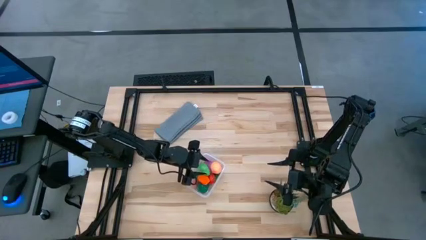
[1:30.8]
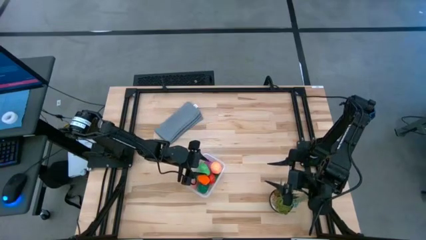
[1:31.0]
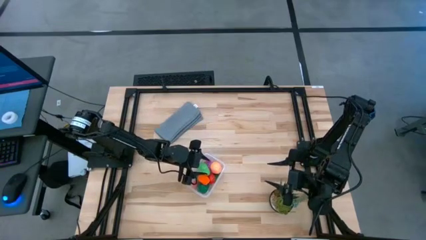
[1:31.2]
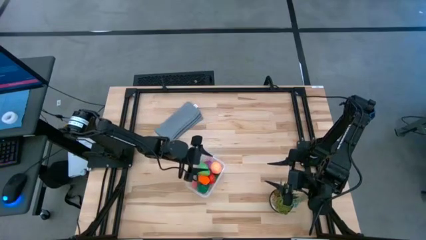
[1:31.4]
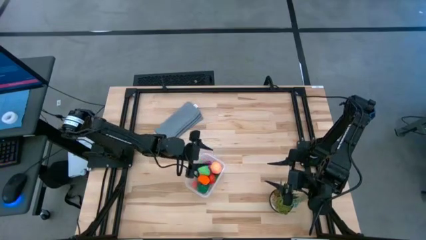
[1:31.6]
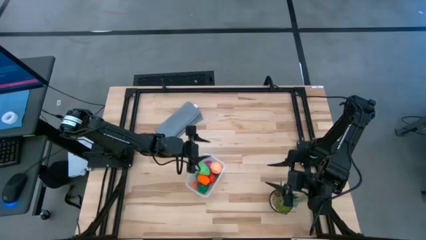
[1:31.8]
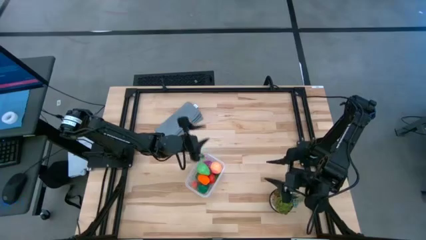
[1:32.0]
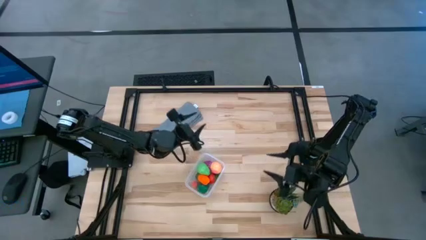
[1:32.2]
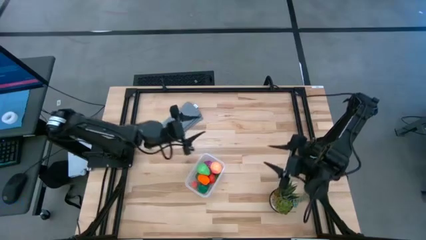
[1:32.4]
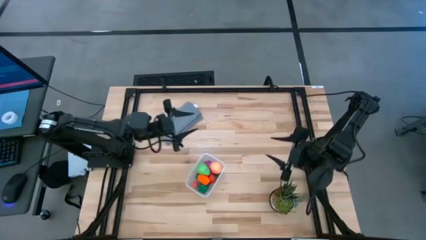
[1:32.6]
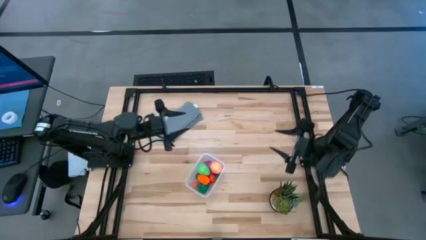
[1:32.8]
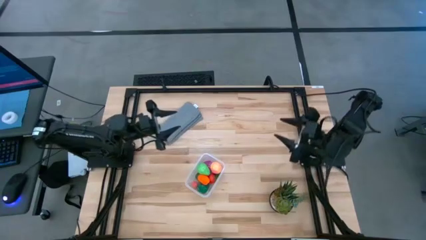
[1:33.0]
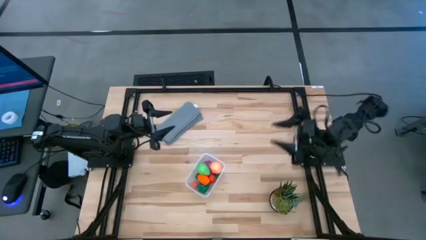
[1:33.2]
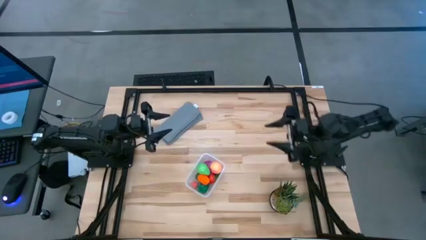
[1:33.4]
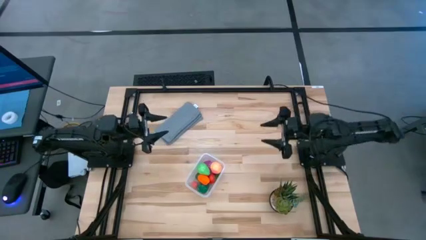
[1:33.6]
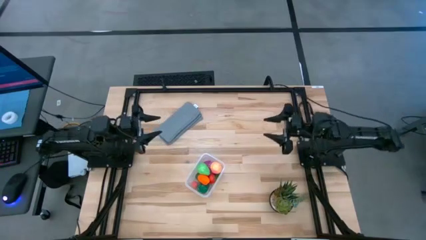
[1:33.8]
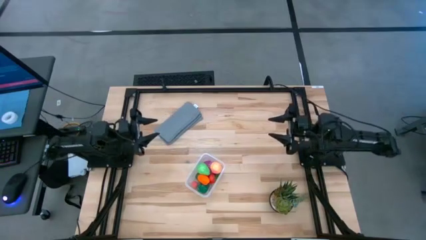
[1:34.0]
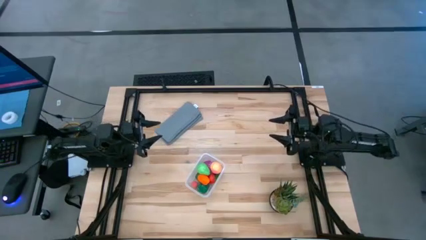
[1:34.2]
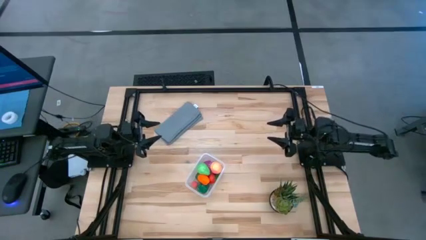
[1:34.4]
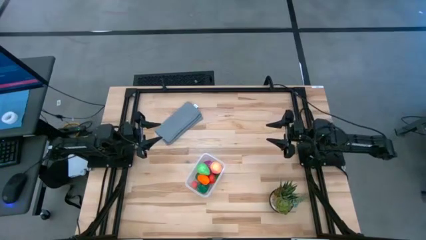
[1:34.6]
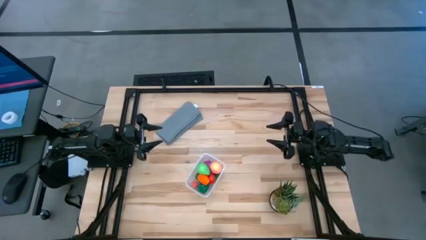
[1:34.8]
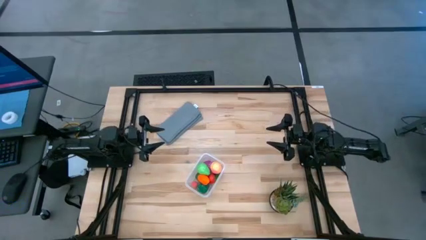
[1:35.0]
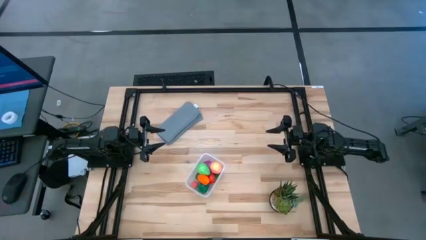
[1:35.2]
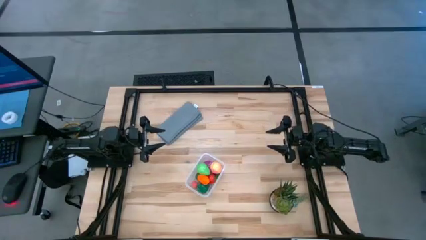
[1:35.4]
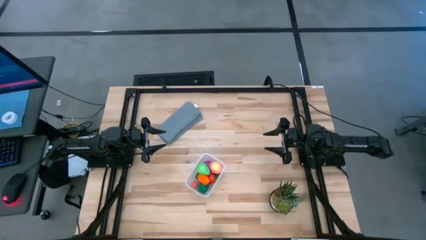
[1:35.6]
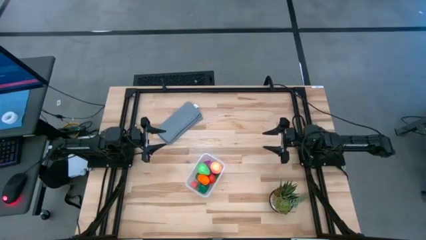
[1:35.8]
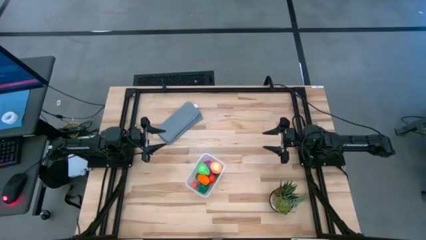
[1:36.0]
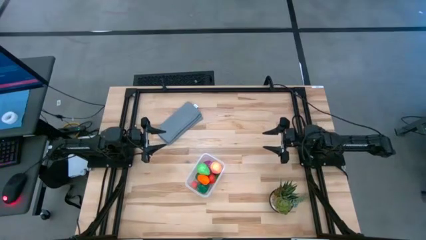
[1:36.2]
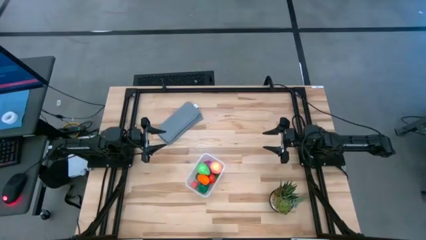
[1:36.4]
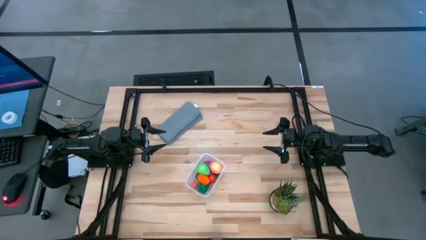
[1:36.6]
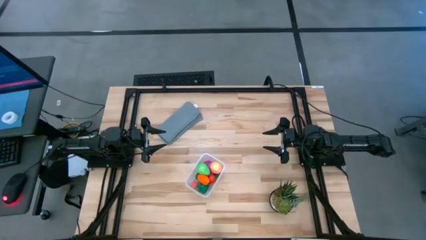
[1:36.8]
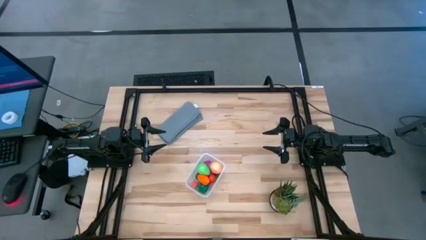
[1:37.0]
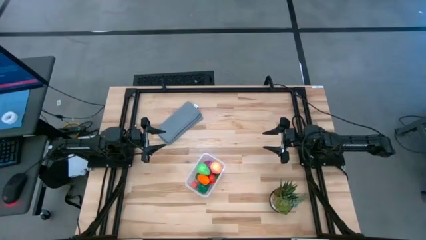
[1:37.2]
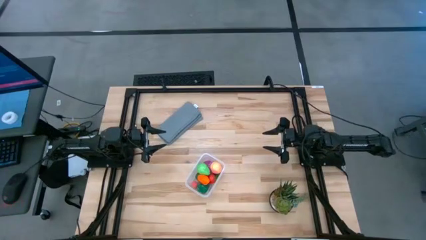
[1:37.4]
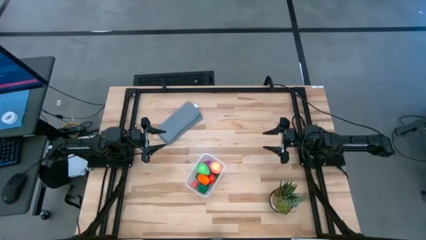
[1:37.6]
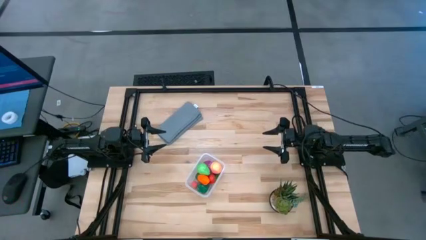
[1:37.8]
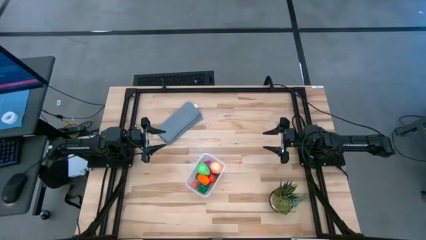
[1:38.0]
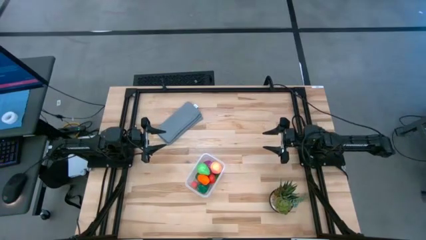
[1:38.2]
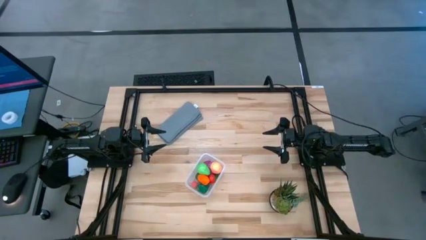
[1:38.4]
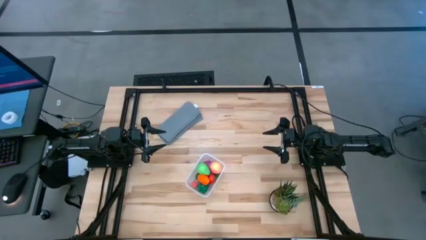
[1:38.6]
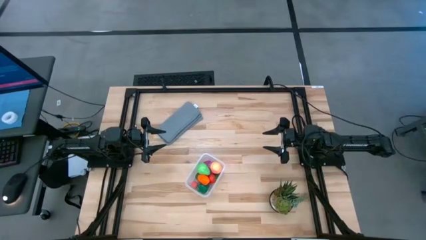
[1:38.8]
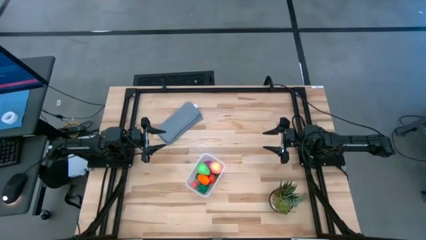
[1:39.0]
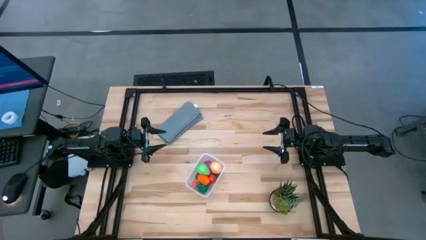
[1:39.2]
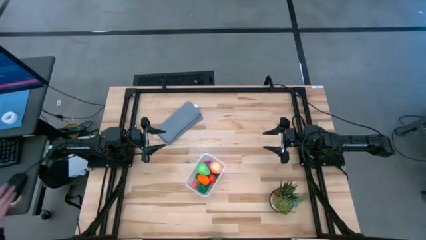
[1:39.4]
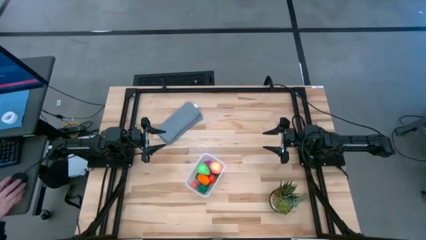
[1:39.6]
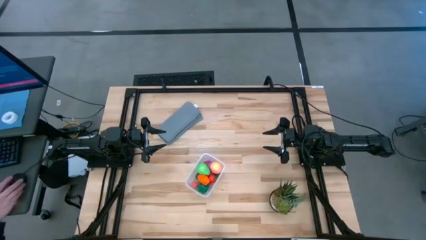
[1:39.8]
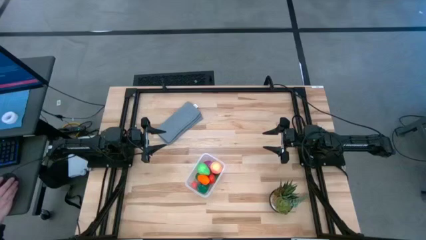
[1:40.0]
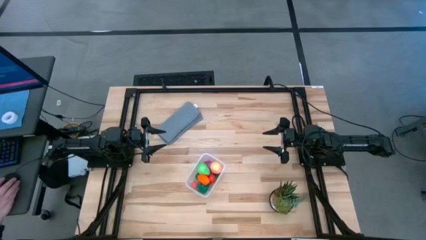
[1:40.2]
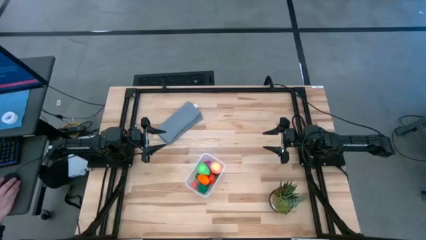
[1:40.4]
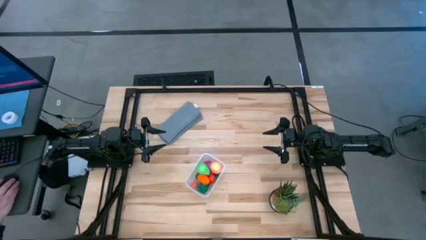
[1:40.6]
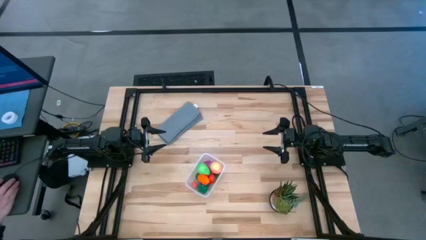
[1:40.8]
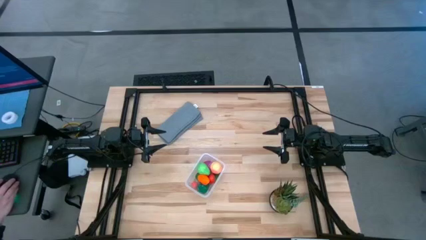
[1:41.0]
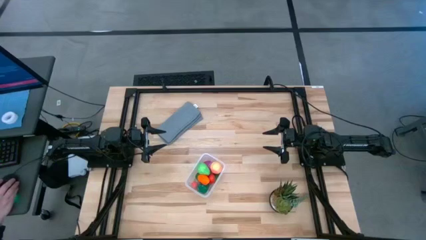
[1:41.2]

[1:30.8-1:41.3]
Task: Pick and placing Produce into tupperware
Return to Home Position

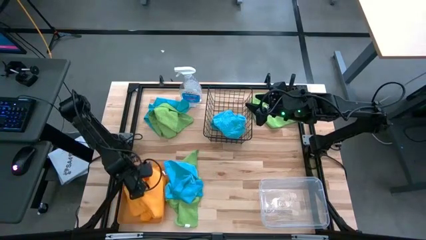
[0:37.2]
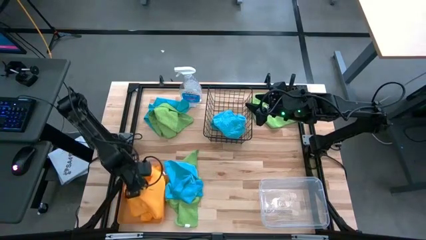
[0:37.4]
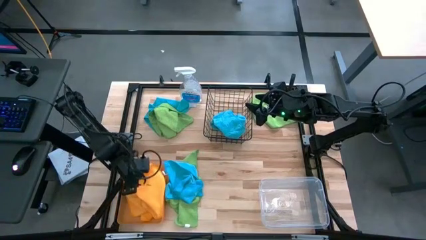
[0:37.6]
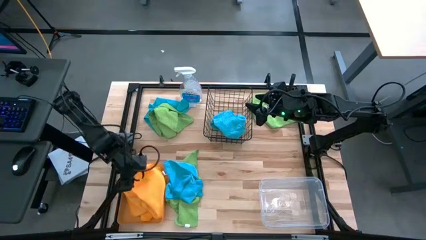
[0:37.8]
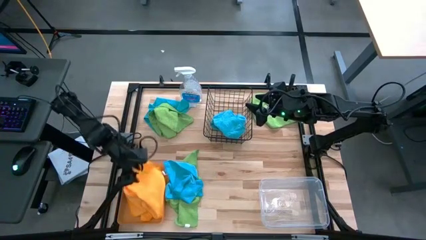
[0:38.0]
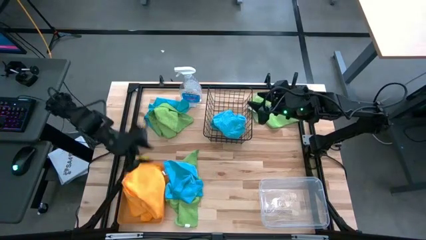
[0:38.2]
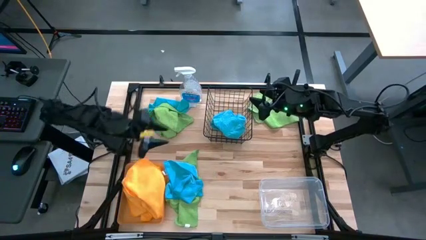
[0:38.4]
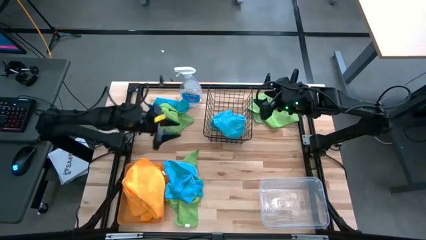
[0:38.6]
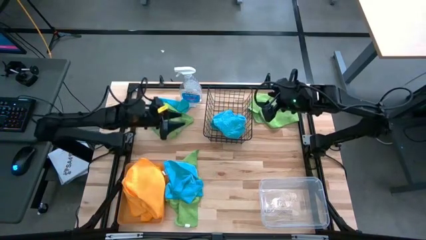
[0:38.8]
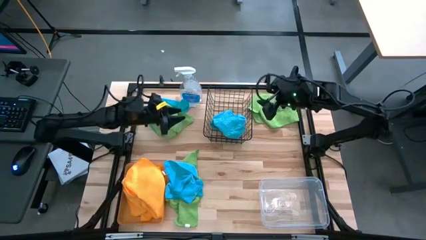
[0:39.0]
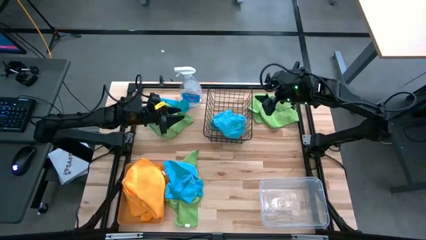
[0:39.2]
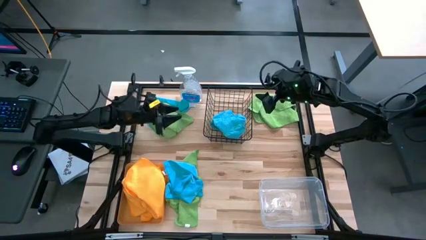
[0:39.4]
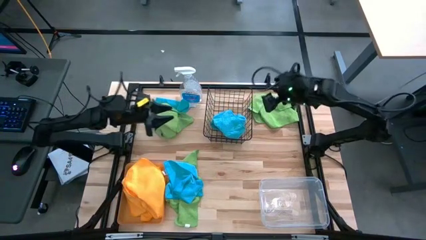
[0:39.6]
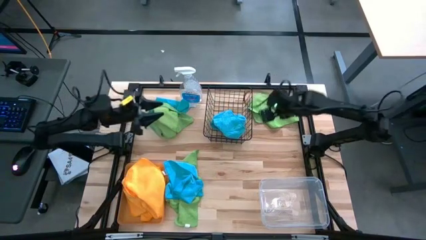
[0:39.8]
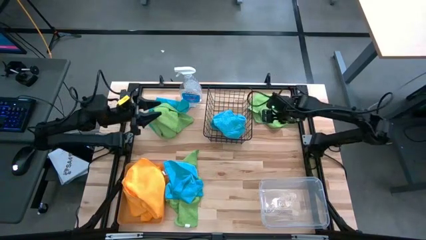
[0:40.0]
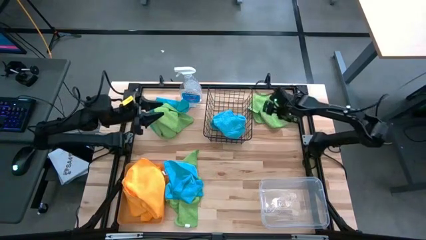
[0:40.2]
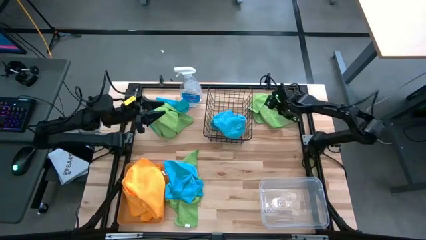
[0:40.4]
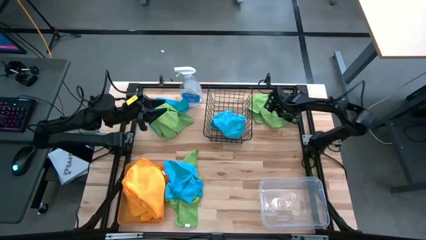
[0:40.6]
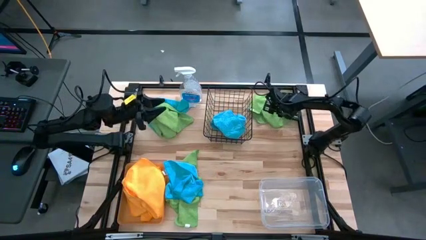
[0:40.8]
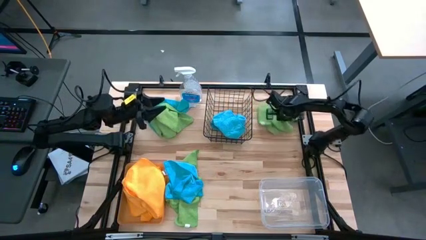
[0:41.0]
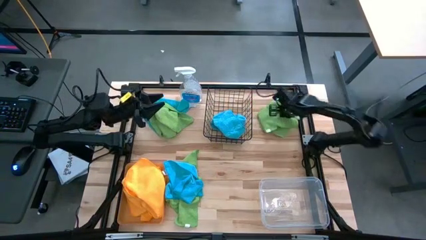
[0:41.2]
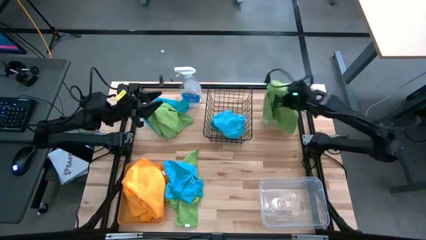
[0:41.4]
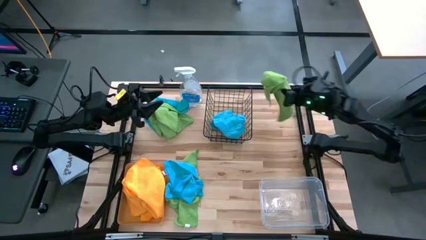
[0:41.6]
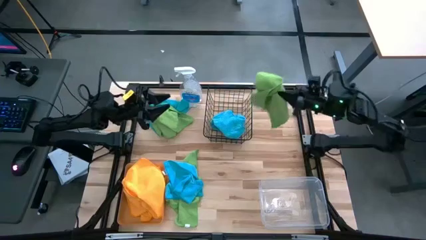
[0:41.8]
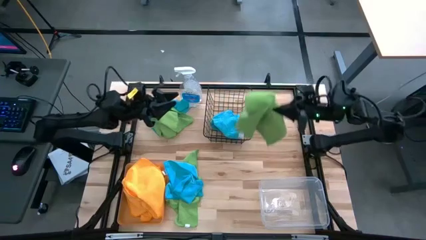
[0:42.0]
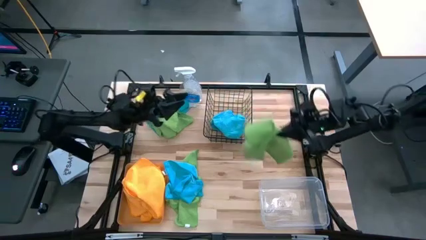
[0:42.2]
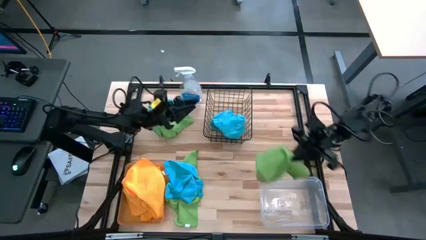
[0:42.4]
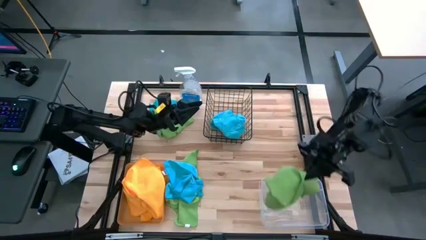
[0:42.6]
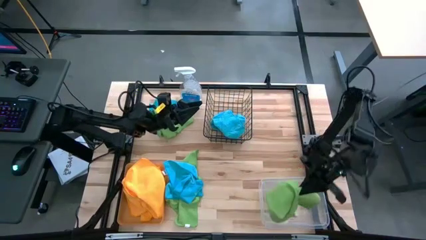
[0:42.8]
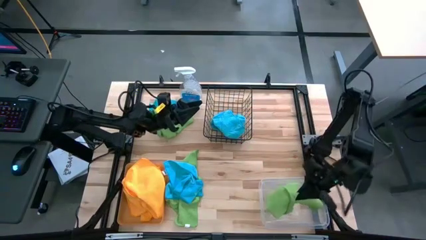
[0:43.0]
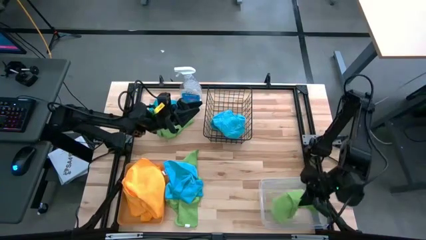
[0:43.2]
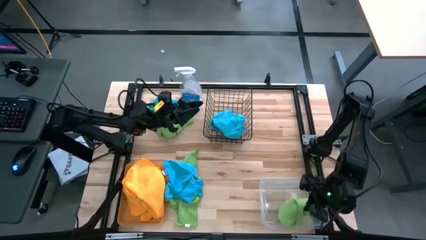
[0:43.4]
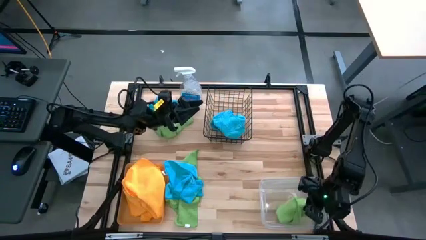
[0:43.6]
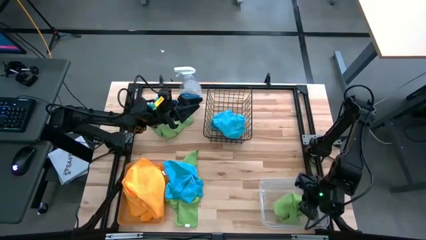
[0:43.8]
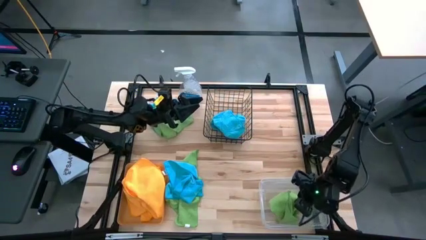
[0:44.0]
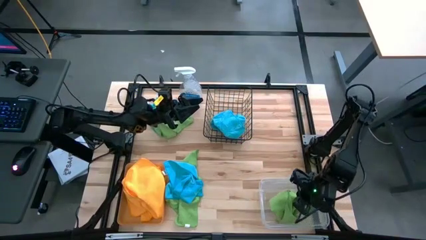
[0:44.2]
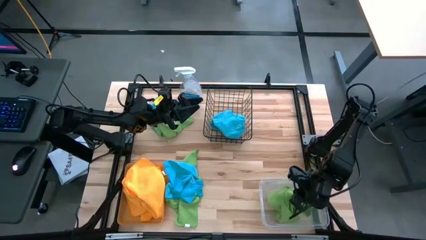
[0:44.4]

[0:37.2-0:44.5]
Task: Sort microfiber towel by color & place in baskets
Put the top right green towel into the transparent bin
